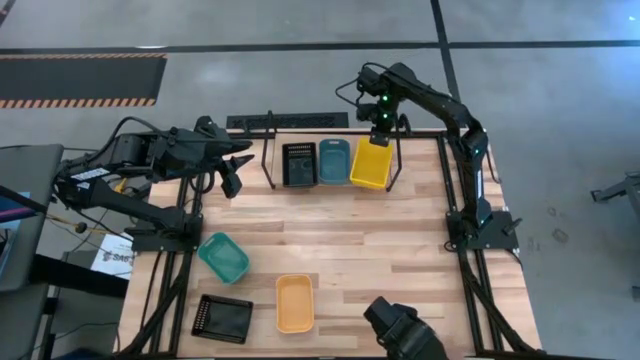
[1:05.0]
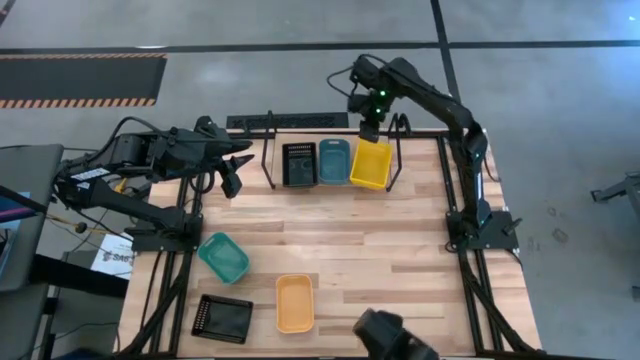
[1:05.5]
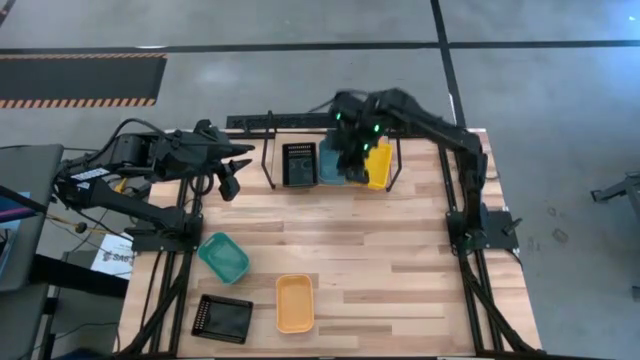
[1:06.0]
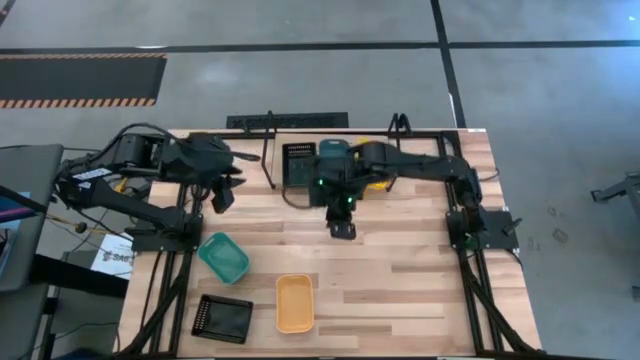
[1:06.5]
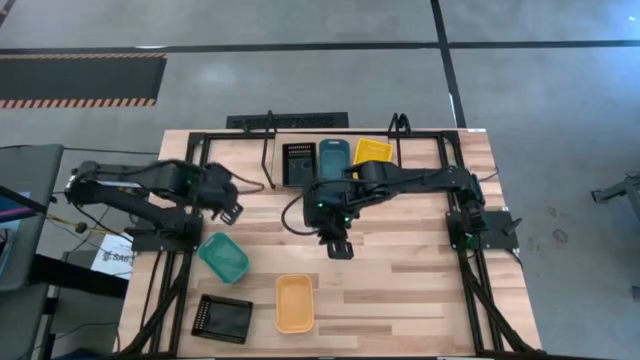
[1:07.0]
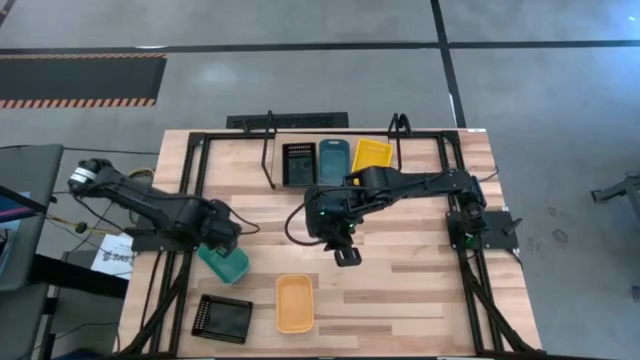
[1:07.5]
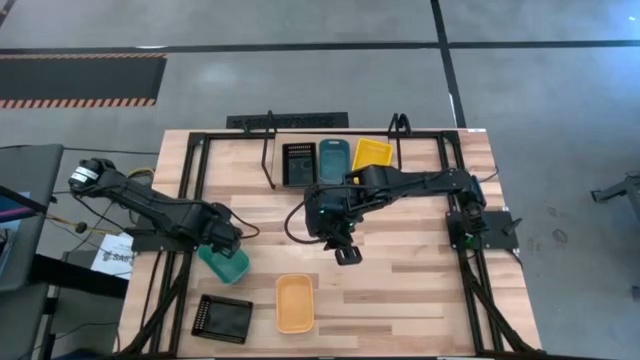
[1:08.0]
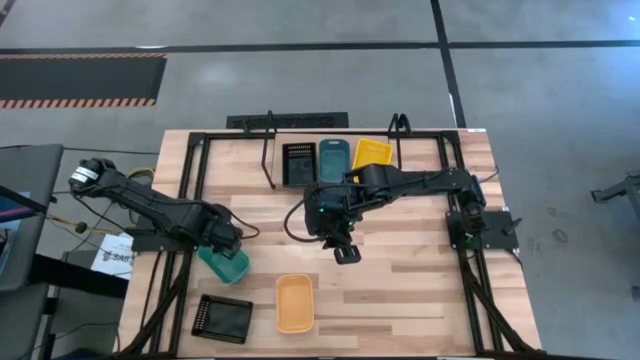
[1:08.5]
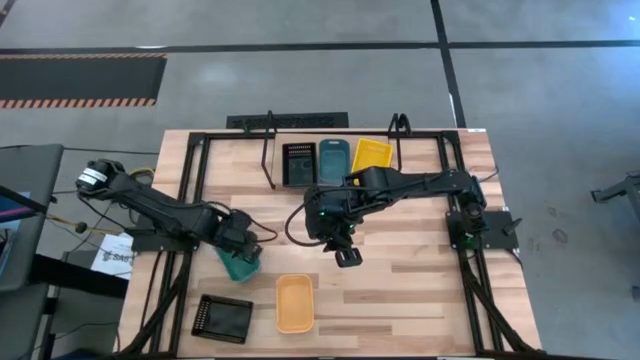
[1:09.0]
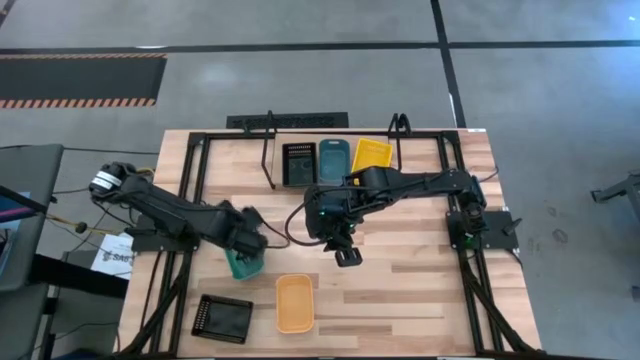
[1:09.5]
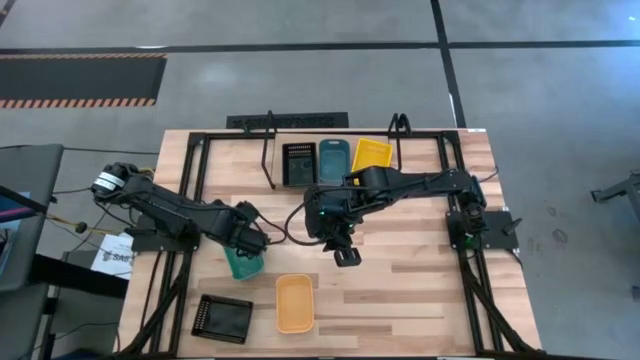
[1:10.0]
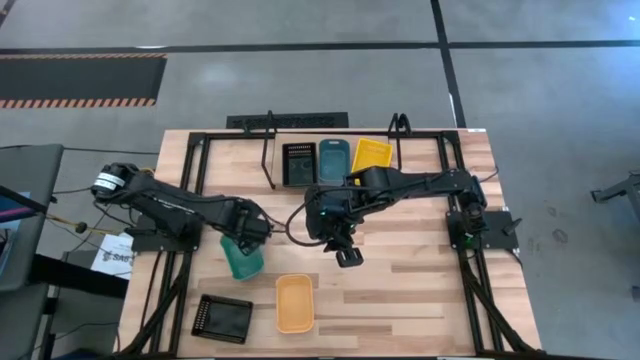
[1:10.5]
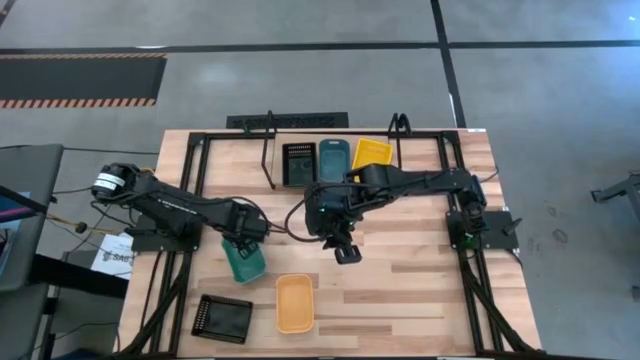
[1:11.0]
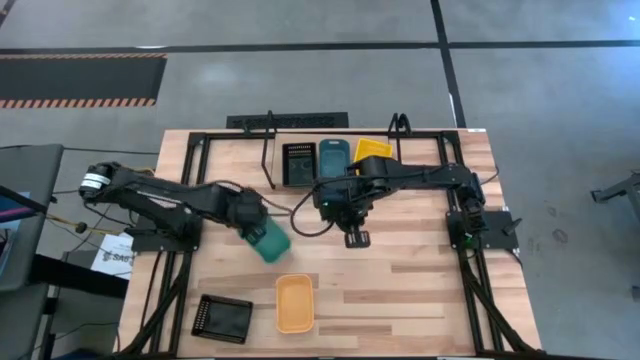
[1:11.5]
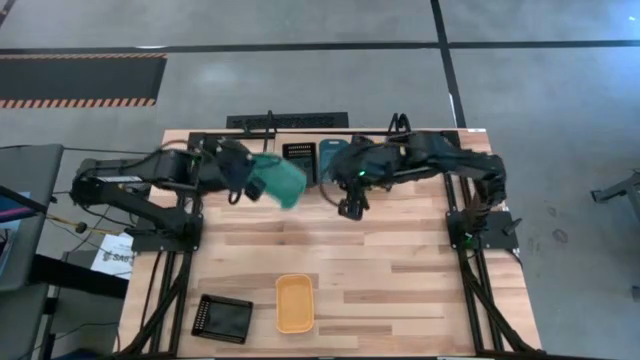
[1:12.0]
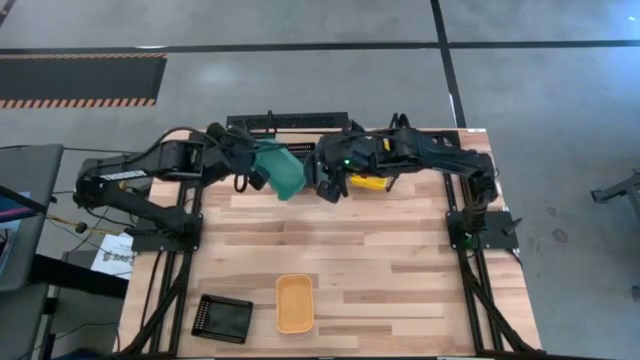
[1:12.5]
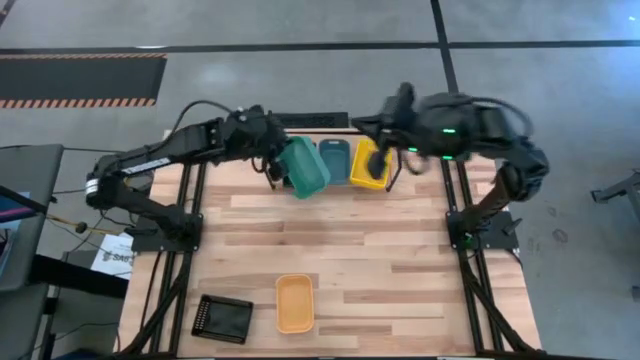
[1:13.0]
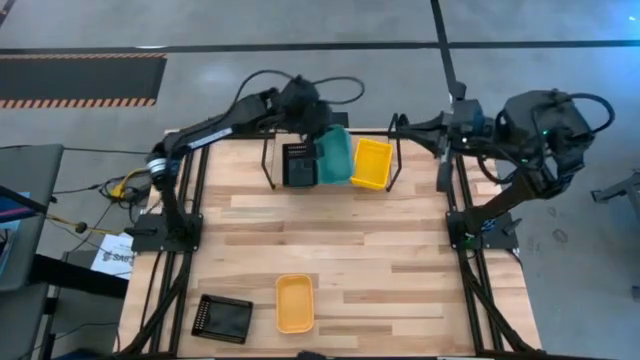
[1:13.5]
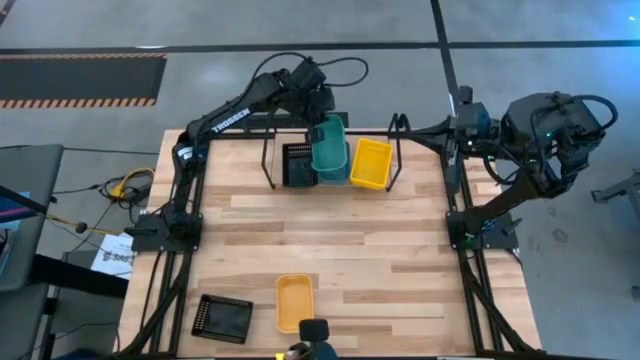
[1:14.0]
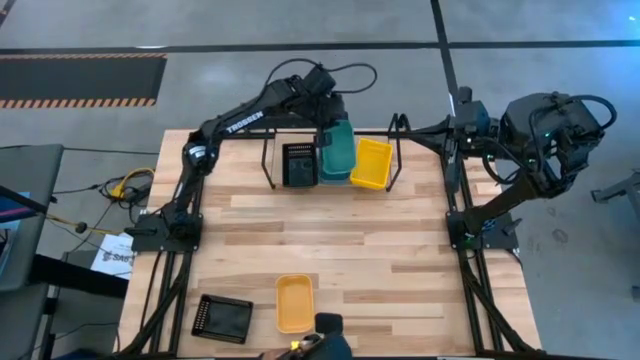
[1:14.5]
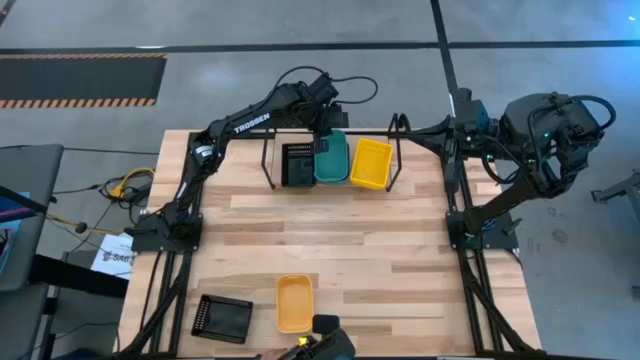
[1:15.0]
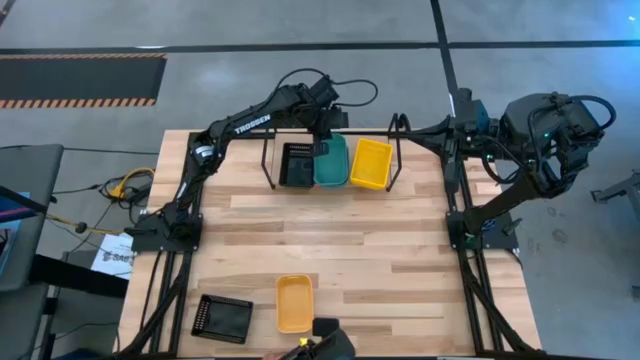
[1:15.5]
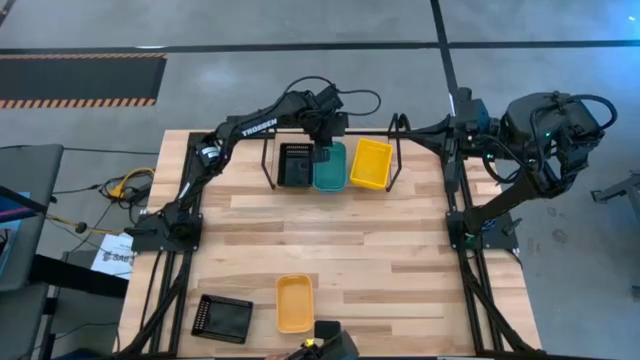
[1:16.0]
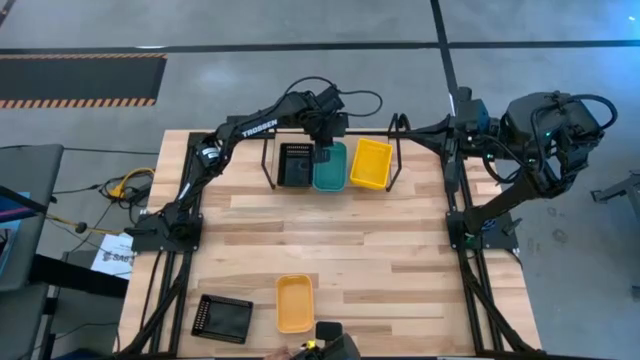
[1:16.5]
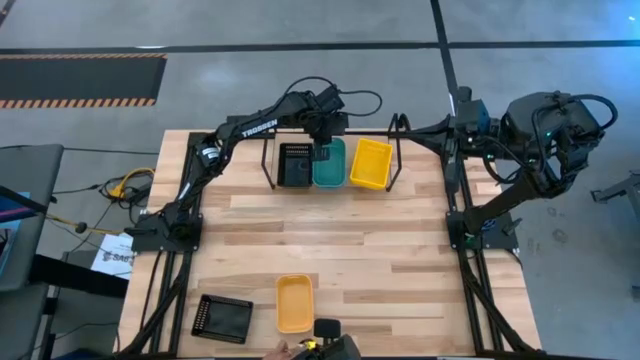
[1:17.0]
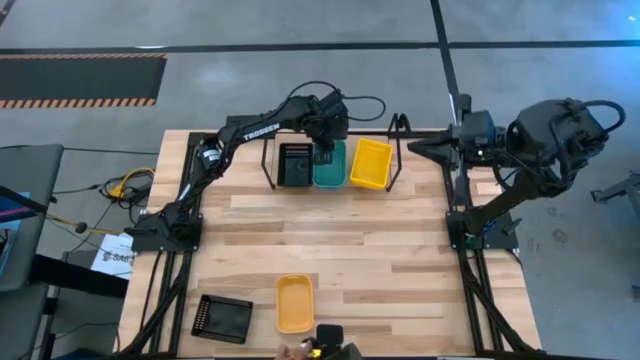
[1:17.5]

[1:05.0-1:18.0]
Task: Stack baskets on shelf by color
Stack the light blue bin the blue bin

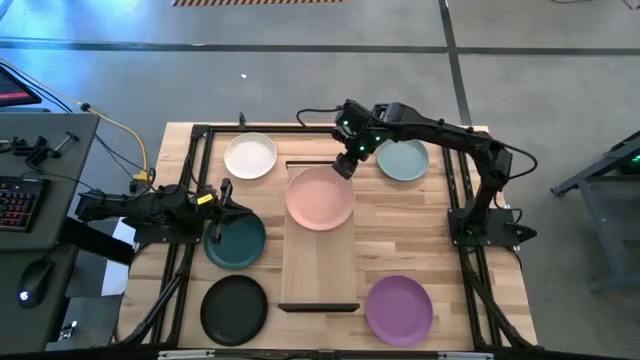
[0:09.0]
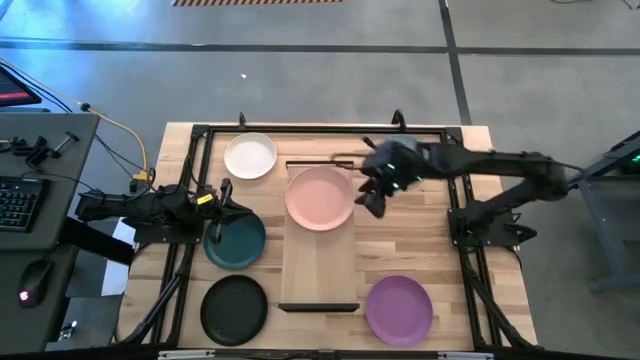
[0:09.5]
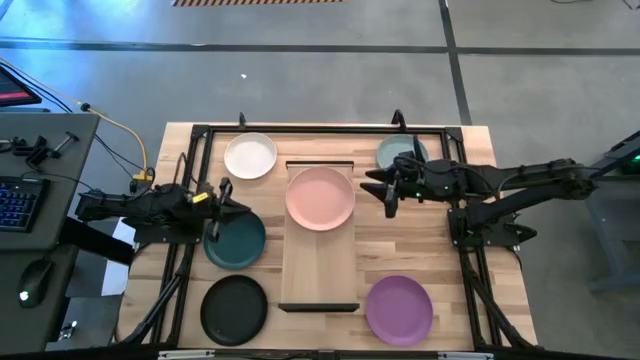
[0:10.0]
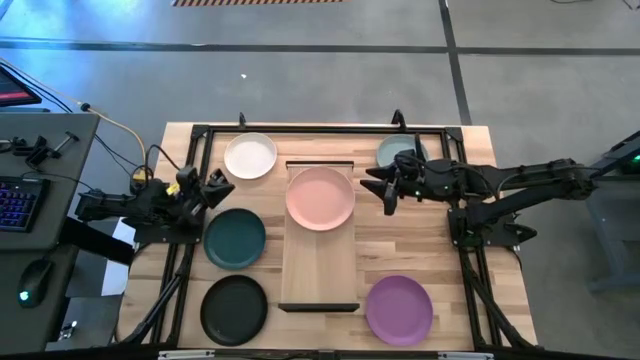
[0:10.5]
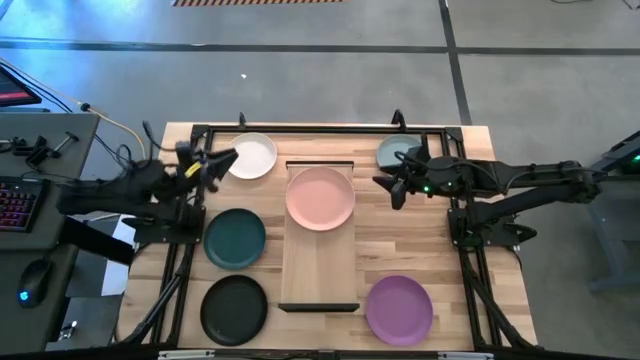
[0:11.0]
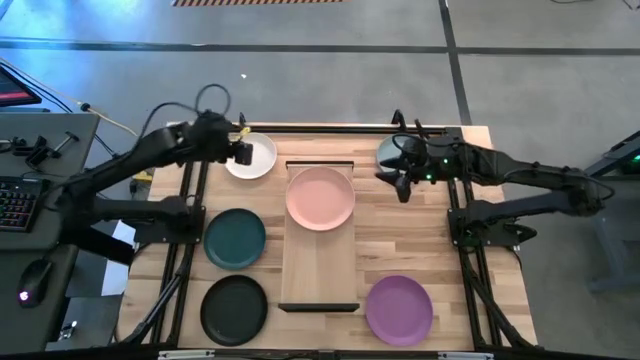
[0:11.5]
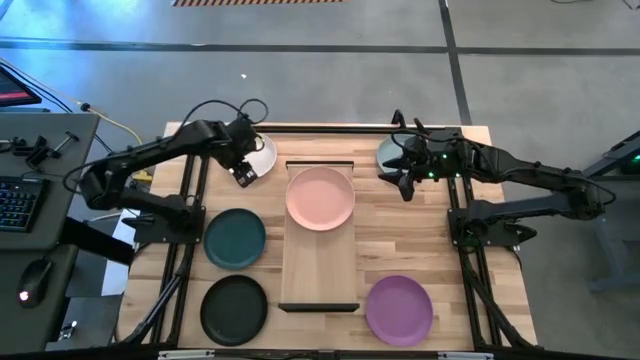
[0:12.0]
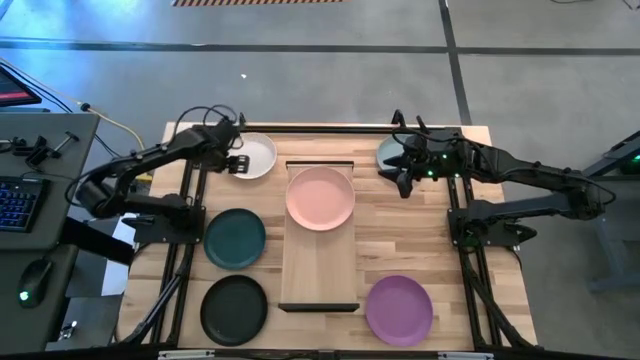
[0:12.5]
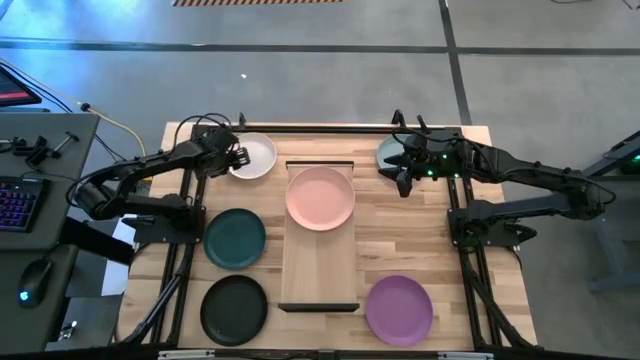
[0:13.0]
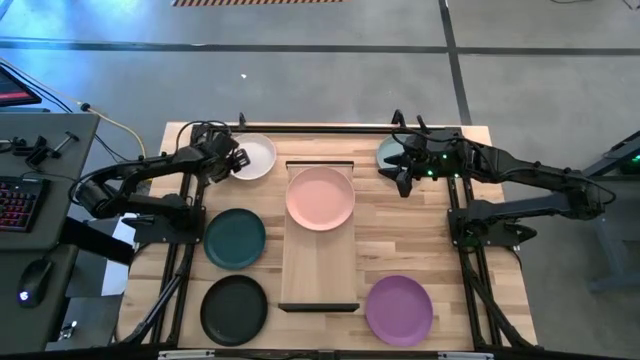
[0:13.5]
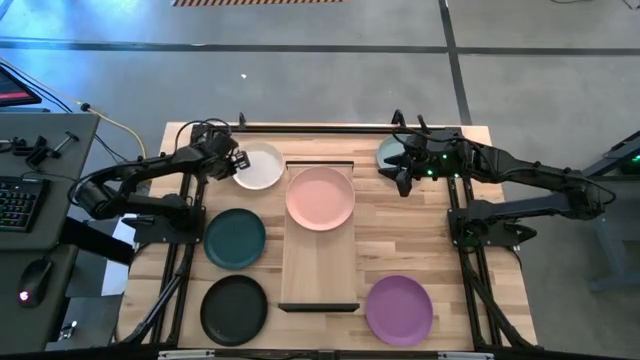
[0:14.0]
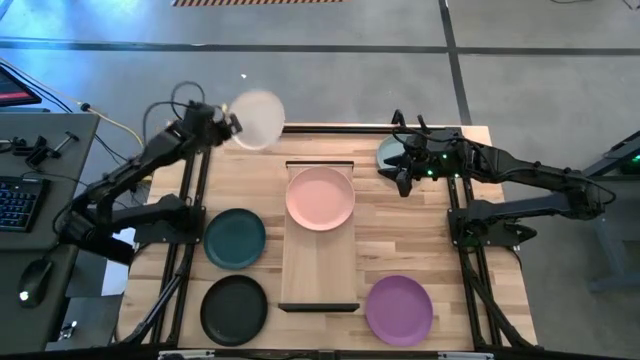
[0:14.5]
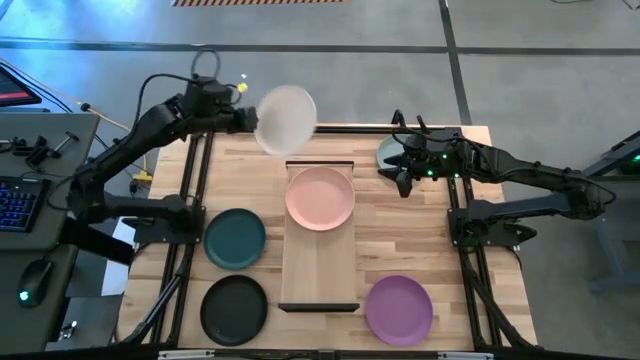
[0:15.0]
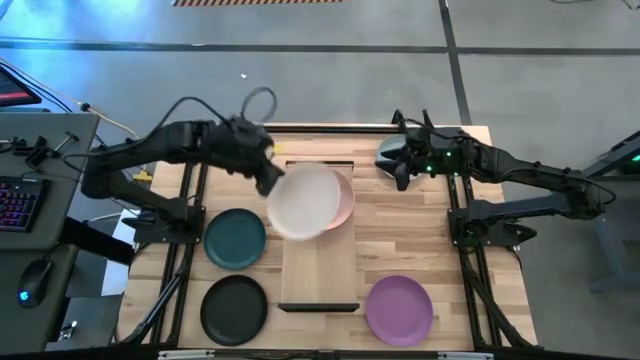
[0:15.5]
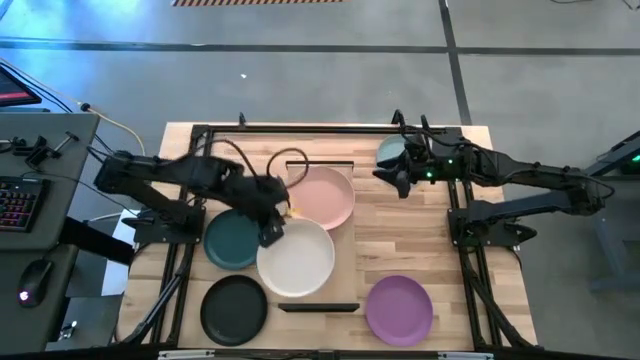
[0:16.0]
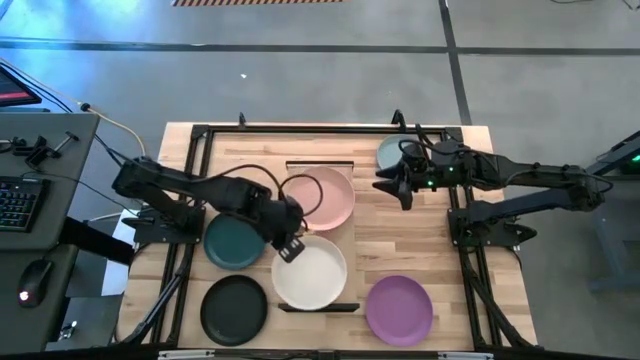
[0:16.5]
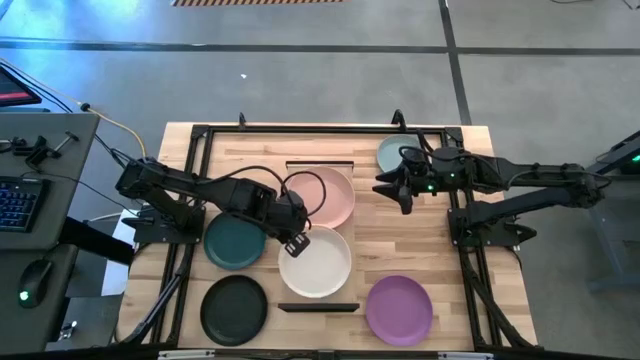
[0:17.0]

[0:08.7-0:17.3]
Task: Place and stack plates onto a shelf
Put the white plate on the shelf
